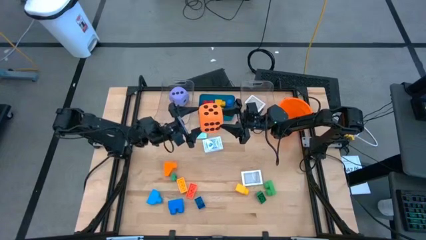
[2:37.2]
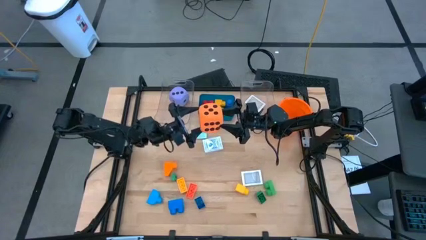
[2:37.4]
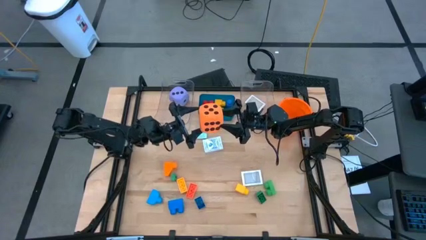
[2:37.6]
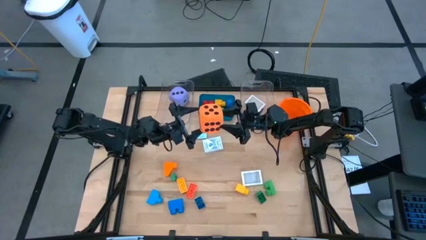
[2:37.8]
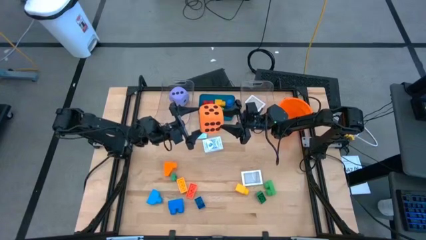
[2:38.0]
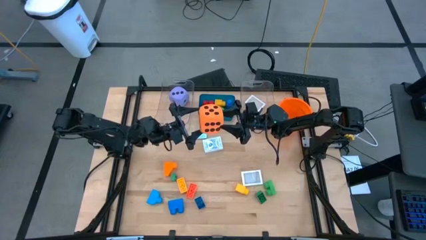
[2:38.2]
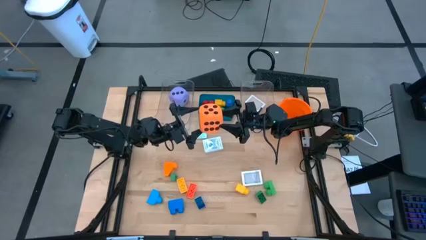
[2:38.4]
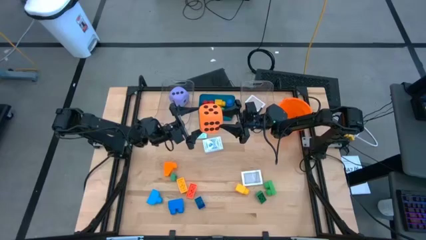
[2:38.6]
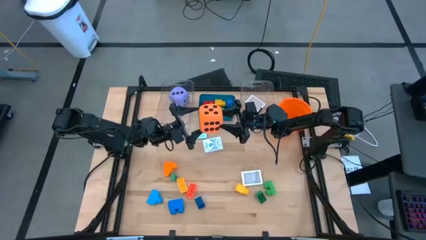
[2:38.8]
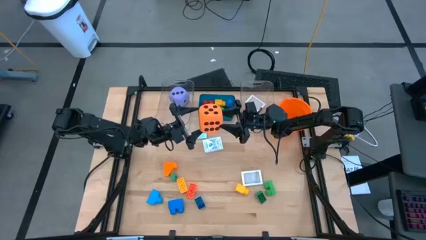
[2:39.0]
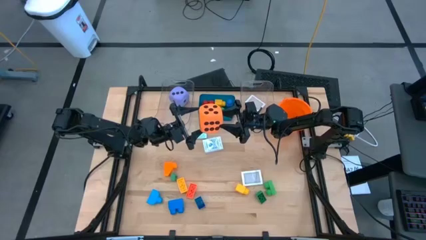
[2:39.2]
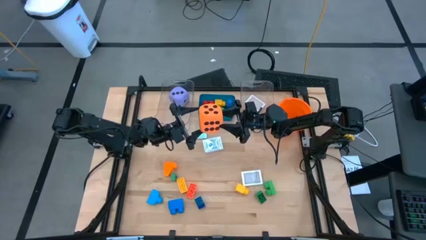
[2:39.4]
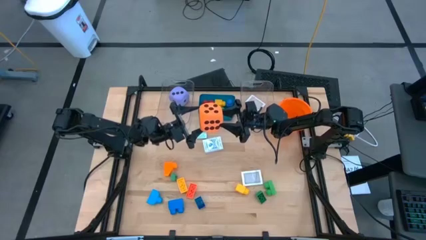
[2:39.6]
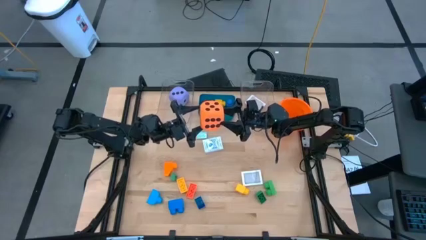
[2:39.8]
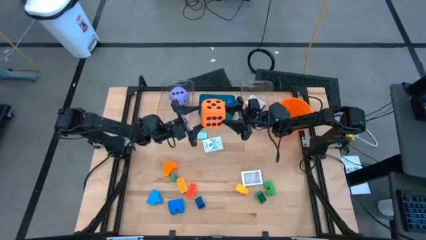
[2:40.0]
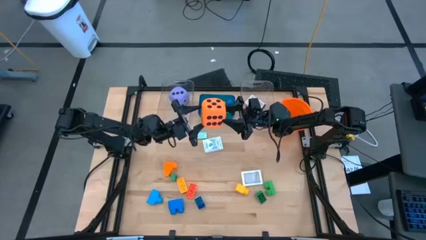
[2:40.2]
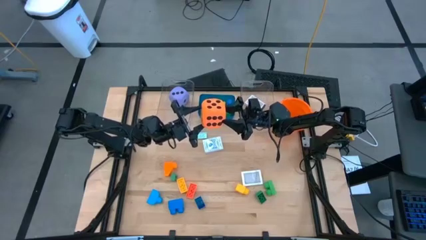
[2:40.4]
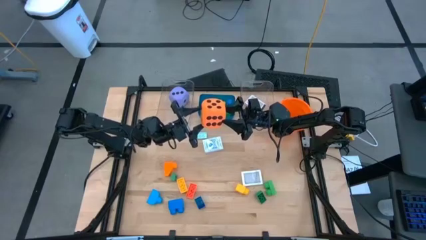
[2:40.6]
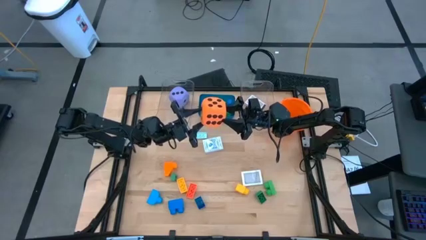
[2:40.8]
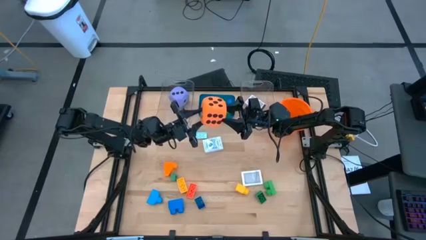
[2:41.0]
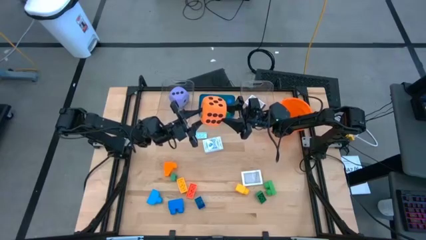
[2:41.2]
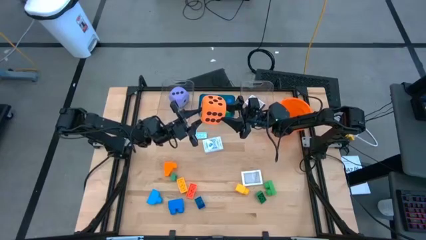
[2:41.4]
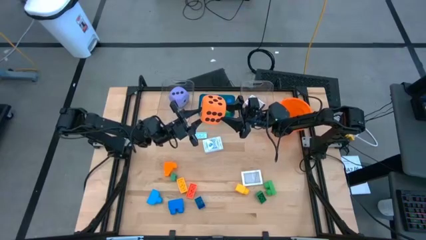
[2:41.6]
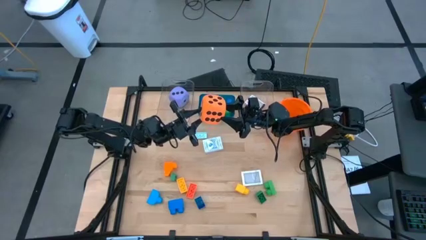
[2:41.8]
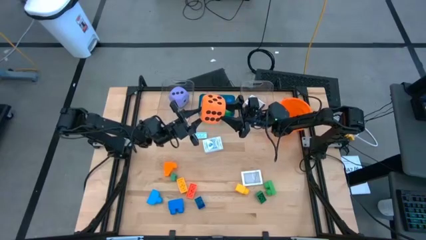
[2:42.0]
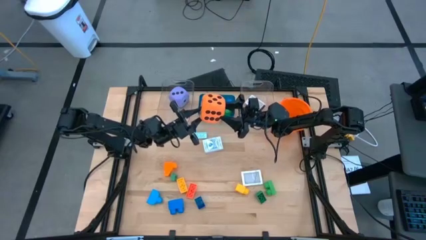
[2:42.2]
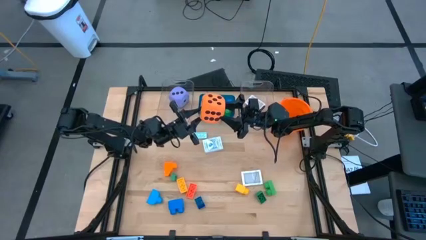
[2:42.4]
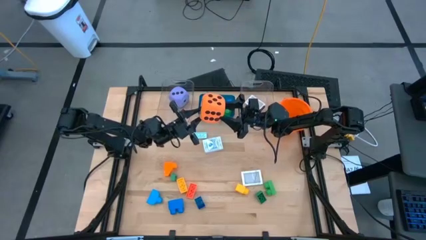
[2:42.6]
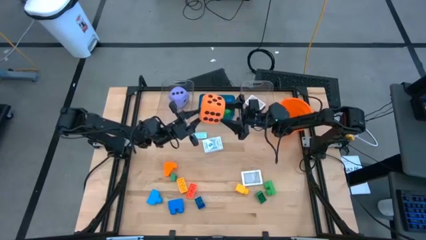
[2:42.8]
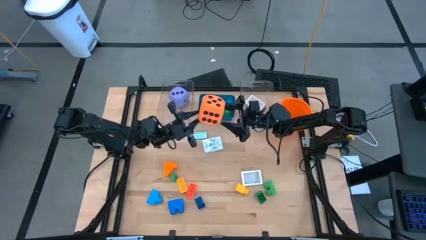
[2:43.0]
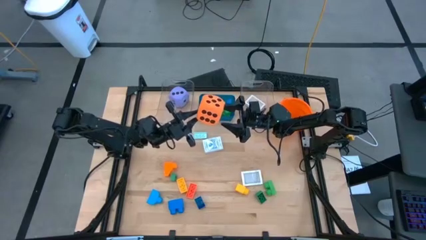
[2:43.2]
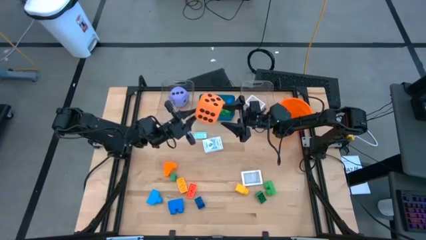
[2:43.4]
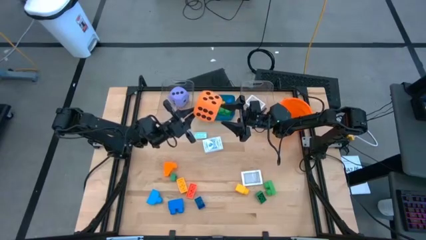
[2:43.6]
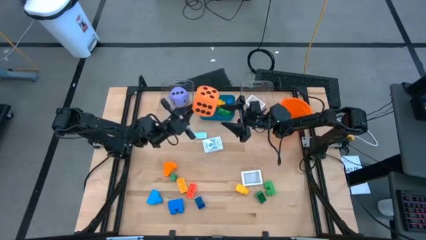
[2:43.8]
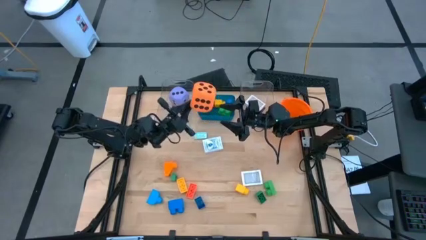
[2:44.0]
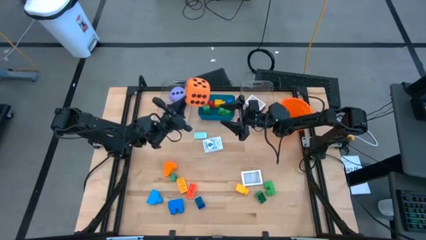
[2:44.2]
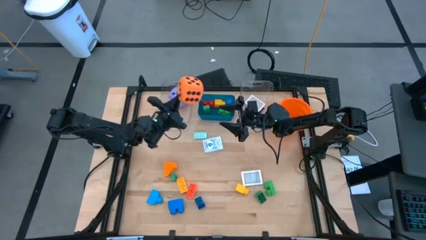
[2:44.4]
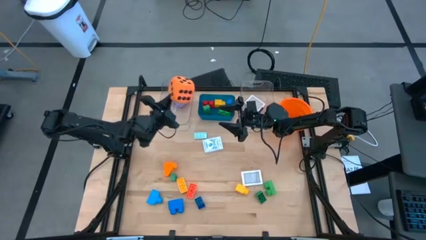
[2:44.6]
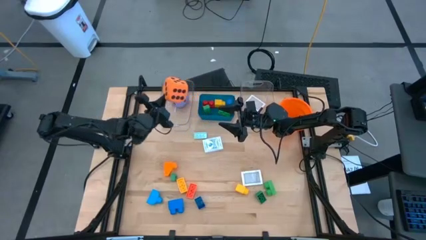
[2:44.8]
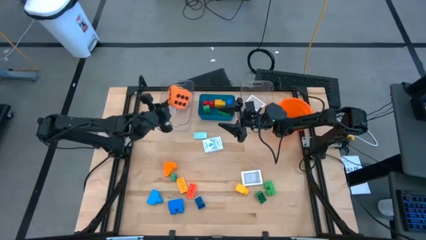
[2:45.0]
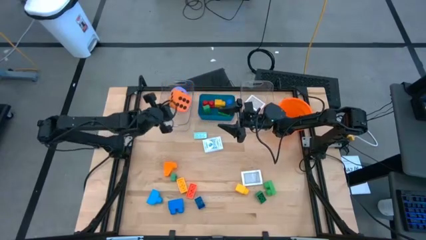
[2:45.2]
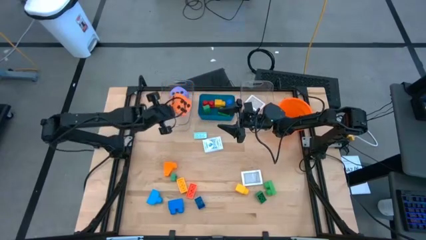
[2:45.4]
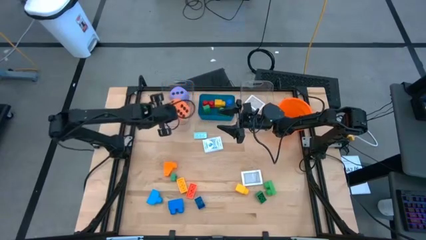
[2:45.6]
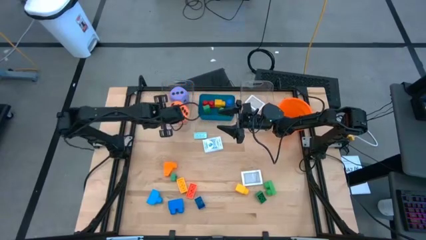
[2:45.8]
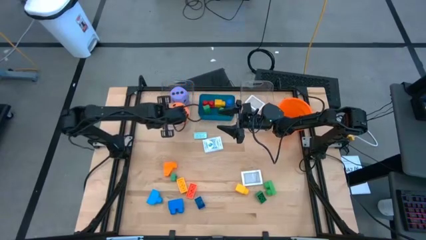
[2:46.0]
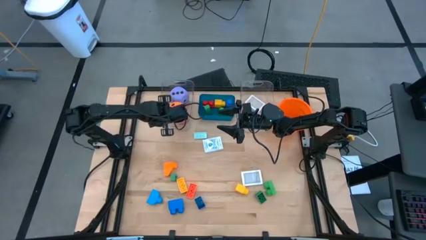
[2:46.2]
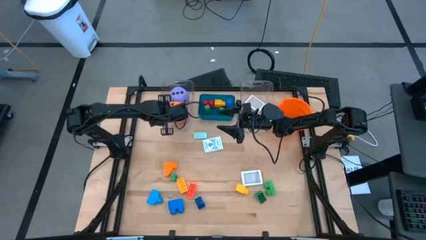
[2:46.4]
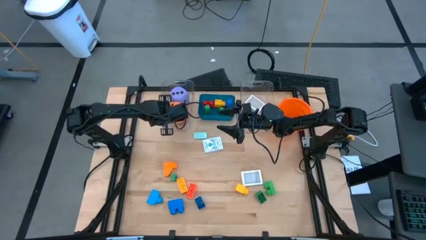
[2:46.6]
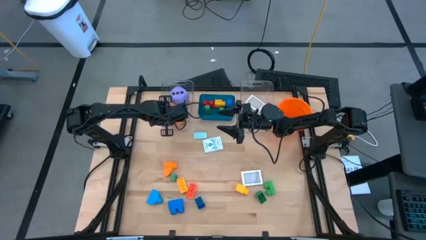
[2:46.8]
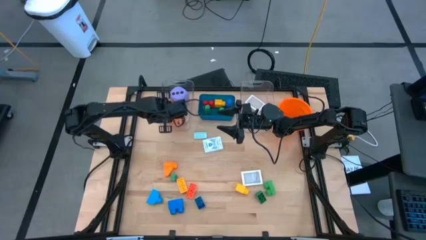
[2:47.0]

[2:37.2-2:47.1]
Task: Pick & Place Toys
Put the orange dice into the left transparent bin

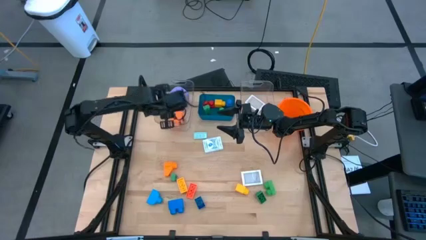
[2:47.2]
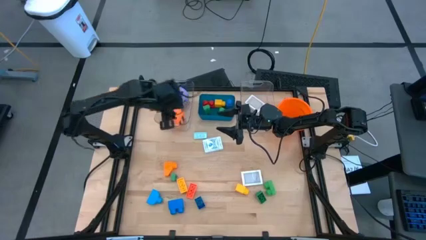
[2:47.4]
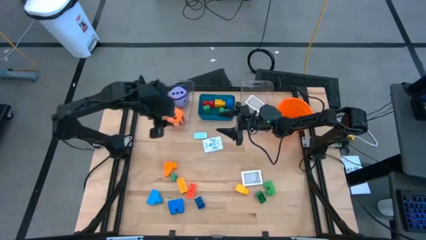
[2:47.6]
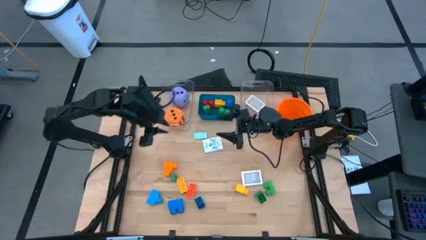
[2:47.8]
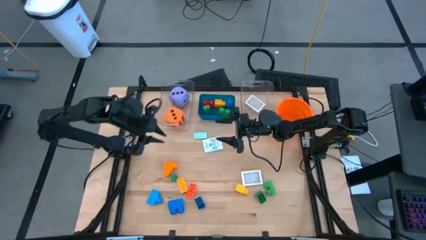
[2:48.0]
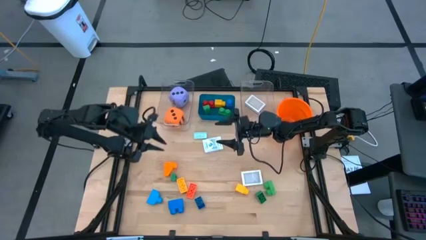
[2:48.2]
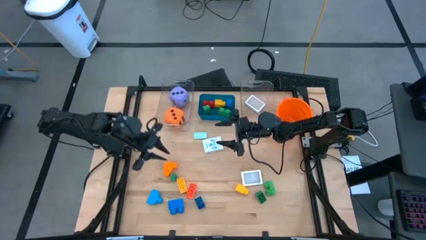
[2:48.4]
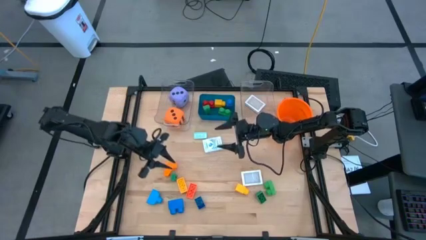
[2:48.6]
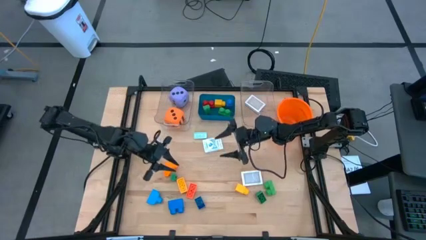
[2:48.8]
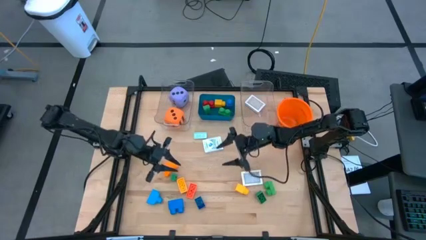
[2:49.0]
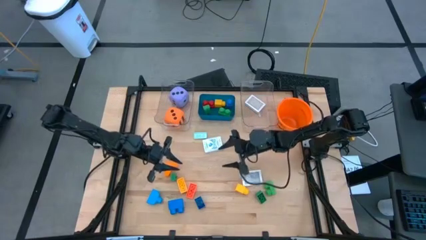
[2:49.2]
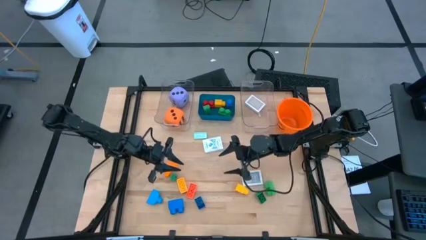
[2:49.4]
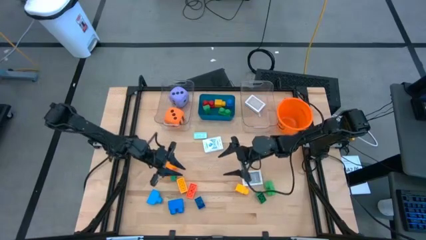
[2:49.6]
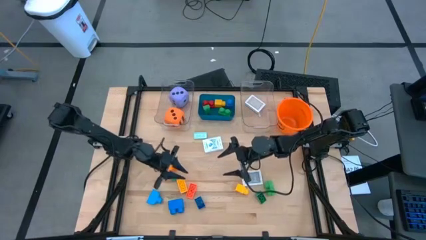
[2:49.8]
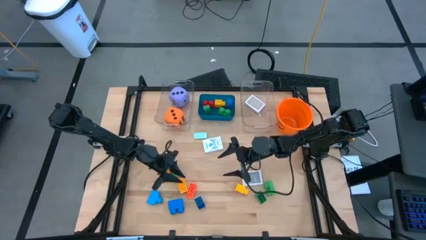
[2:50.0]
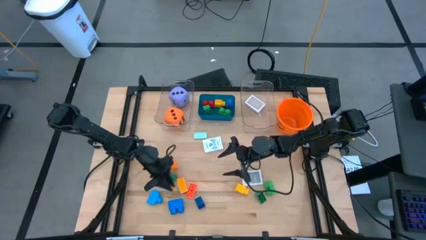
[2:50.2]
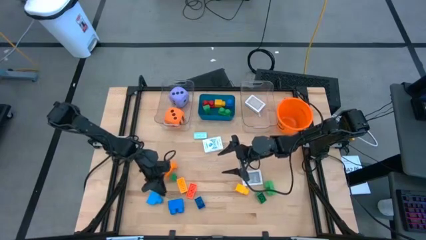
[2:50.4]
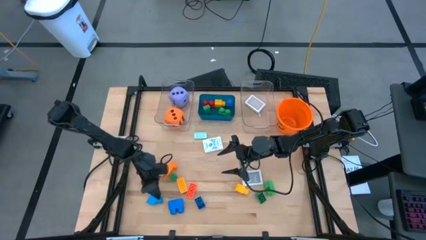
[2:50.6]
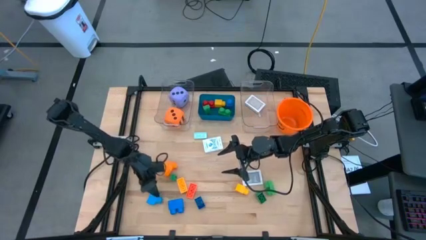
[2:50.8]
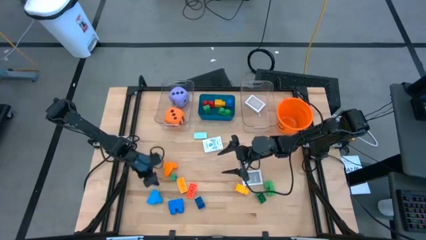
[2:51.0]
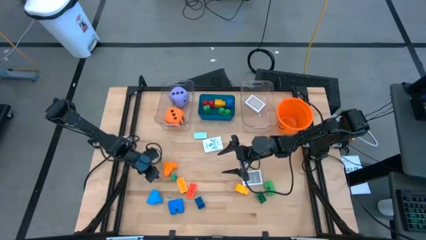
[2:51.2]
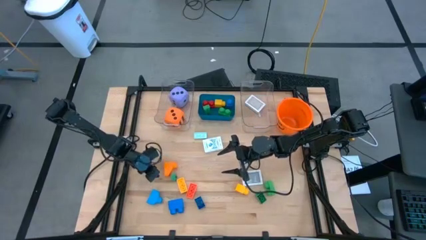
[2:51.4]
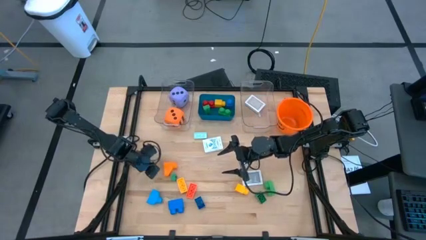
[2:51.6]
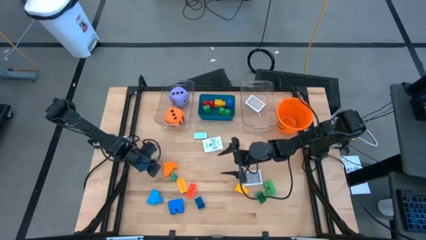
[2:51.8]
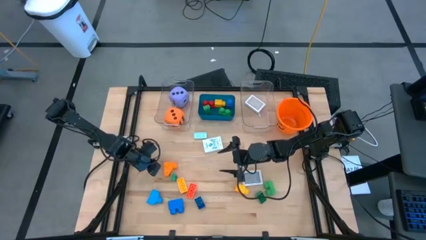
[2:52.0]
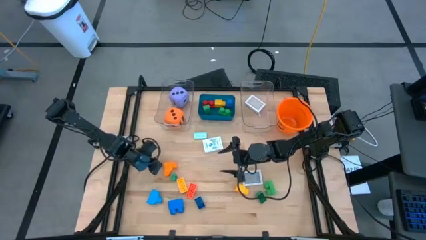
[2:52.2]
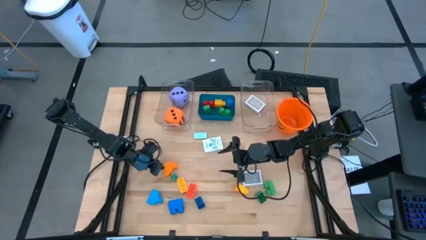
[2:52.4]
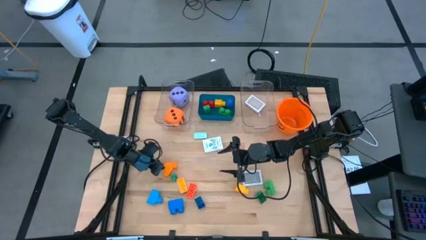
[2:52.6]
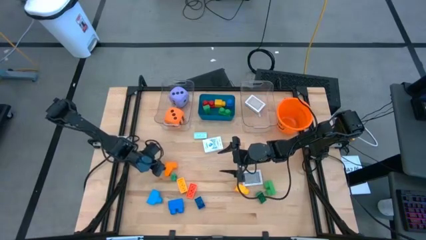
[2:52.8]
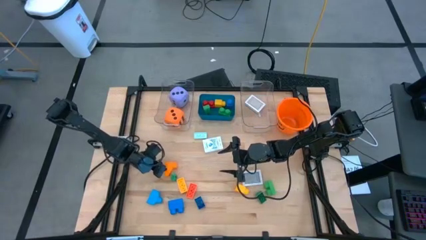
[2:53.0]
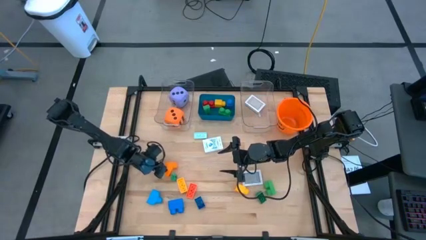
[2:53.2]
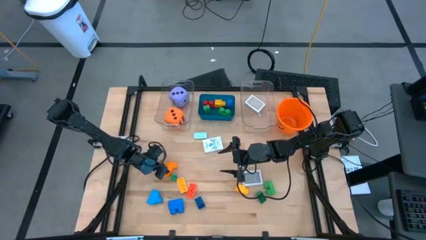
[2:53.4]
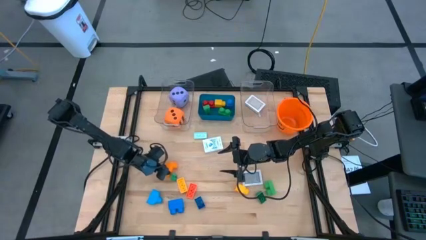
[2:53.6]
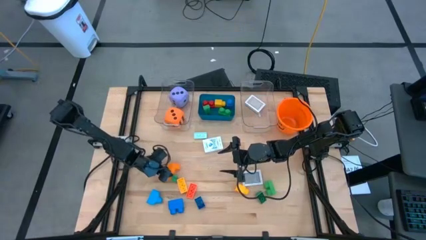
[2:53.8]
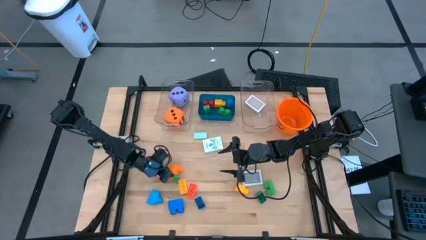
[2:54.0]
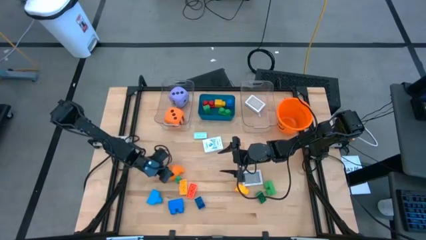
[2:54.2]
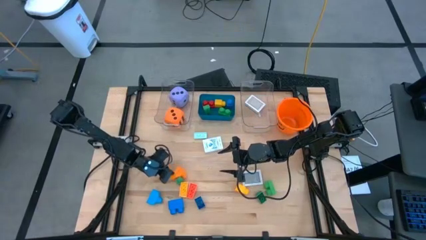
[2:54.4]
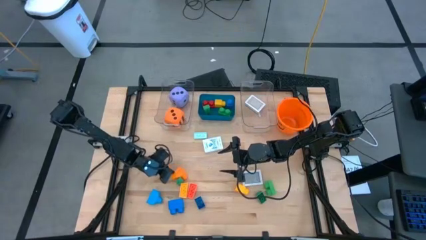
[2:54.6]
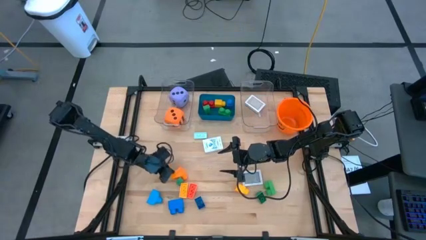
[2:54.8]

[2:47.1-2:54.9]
Put the orange game piece into the blue bin
